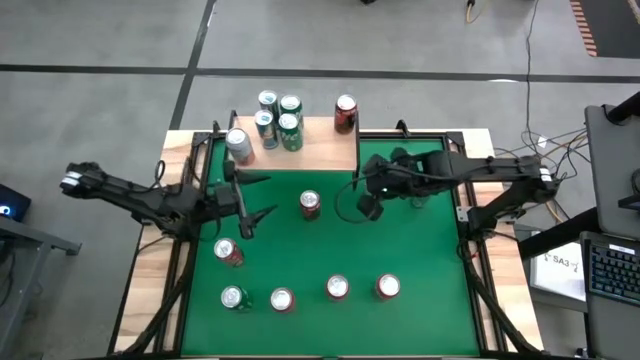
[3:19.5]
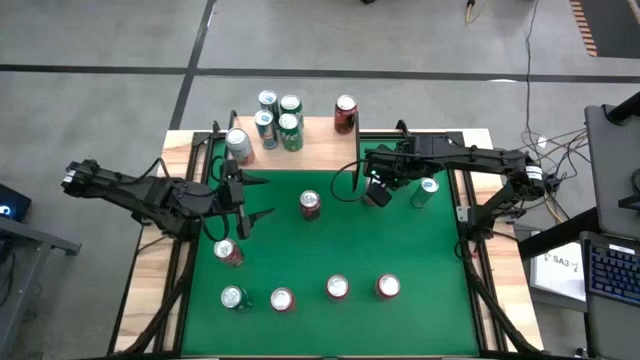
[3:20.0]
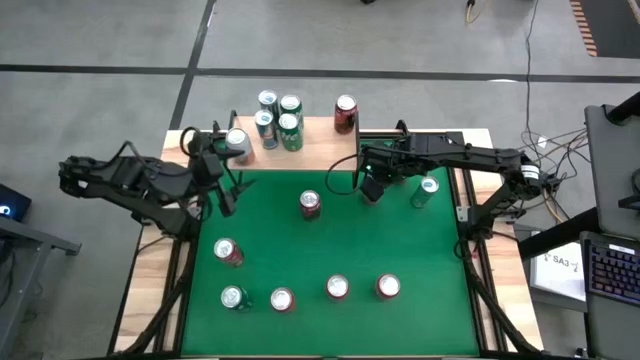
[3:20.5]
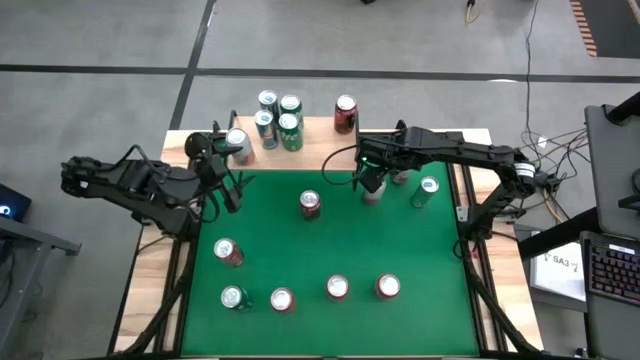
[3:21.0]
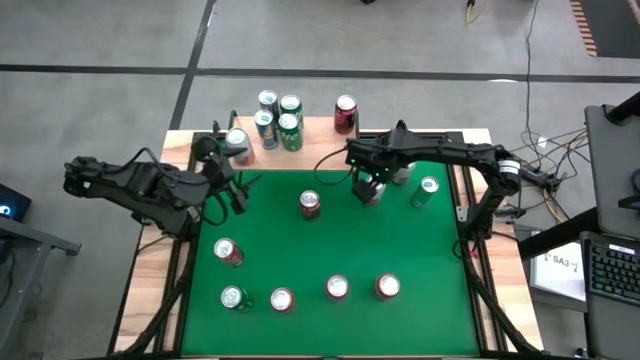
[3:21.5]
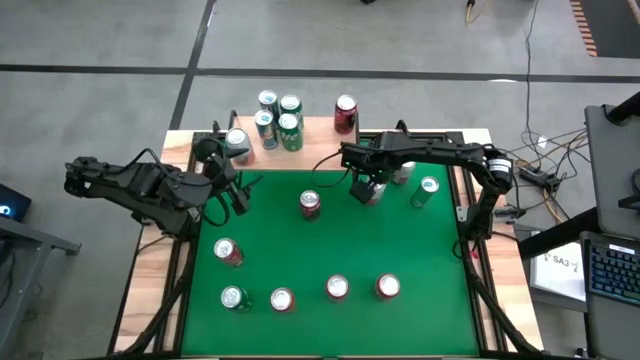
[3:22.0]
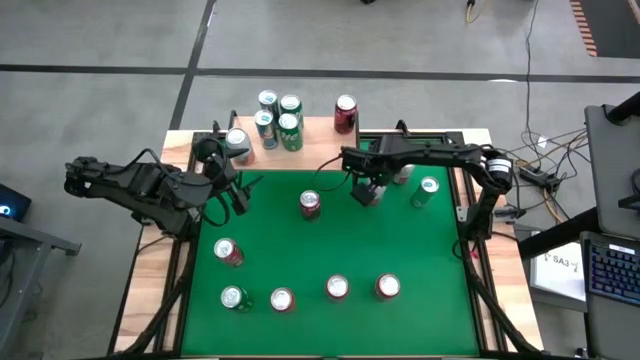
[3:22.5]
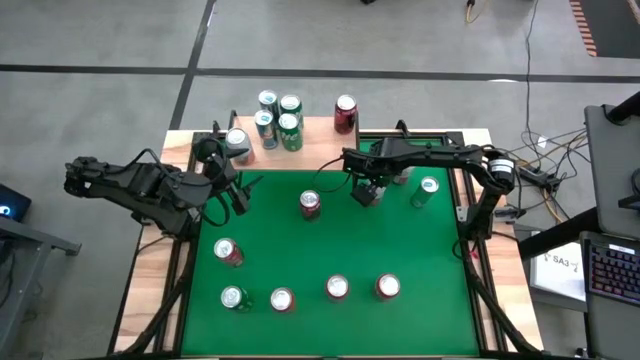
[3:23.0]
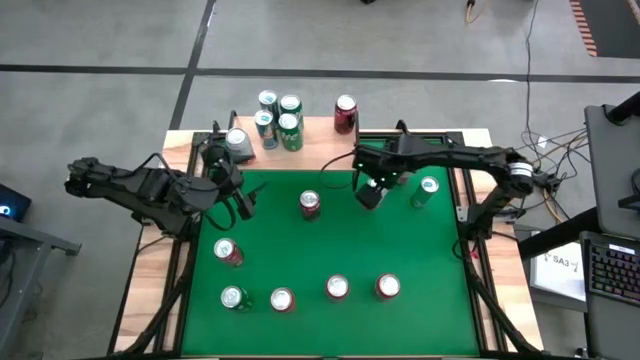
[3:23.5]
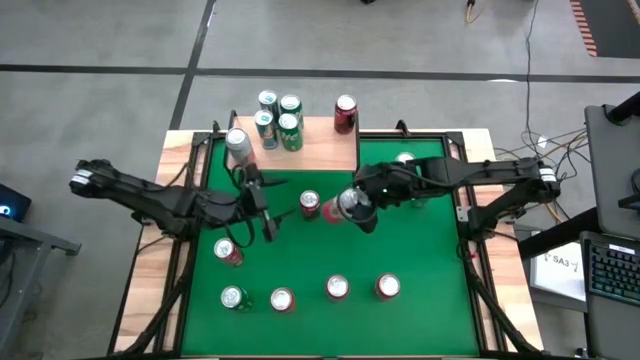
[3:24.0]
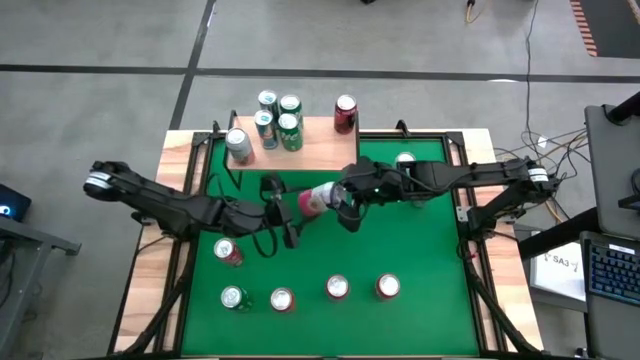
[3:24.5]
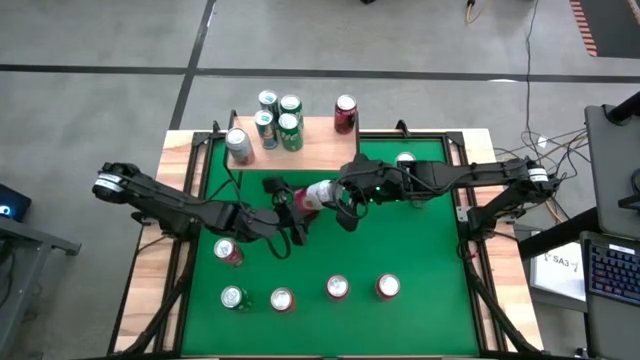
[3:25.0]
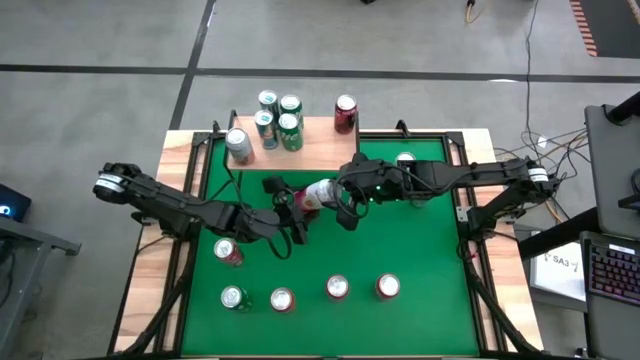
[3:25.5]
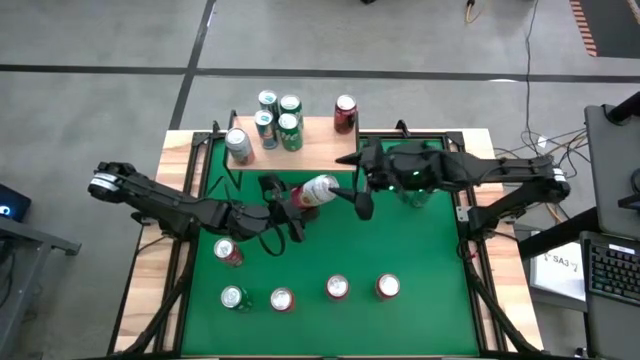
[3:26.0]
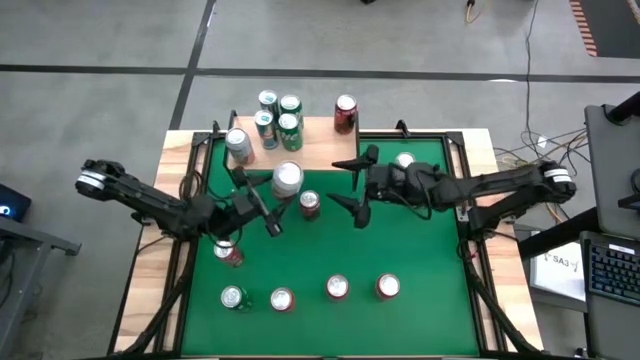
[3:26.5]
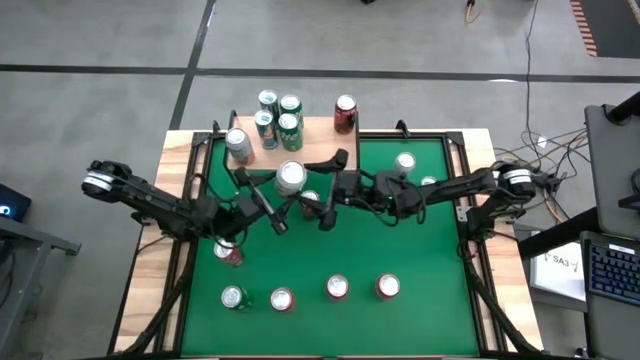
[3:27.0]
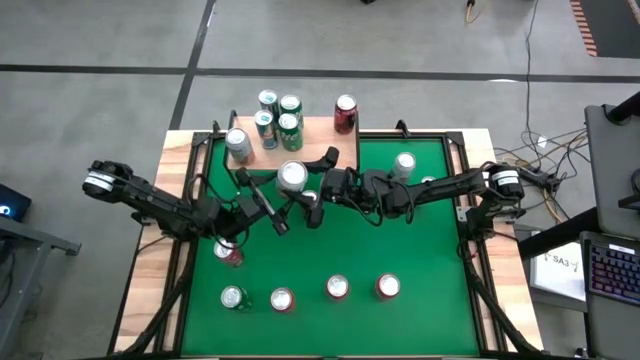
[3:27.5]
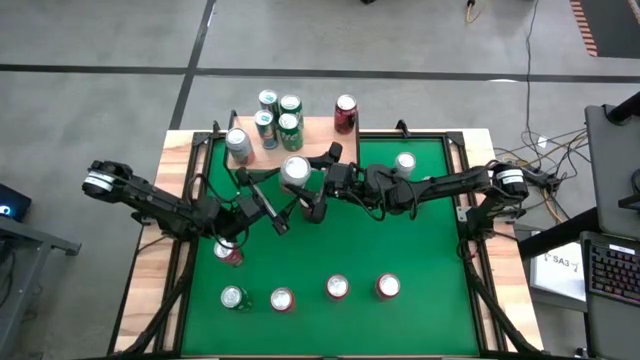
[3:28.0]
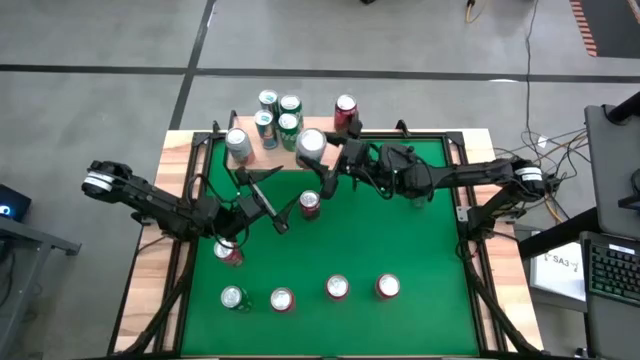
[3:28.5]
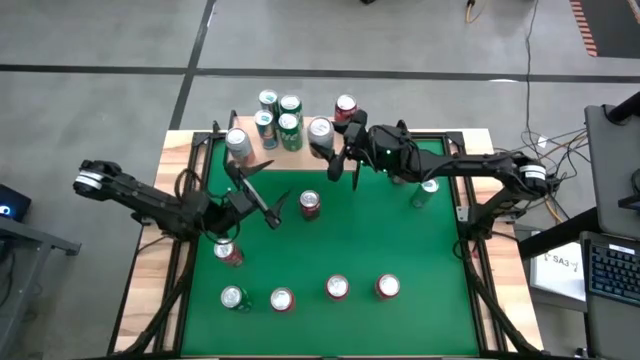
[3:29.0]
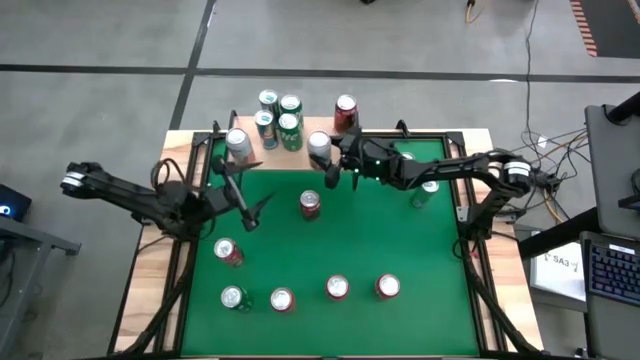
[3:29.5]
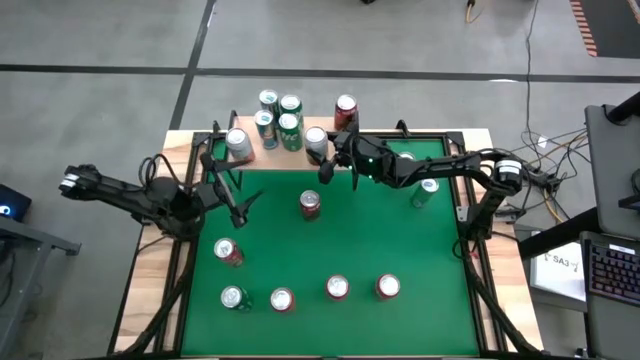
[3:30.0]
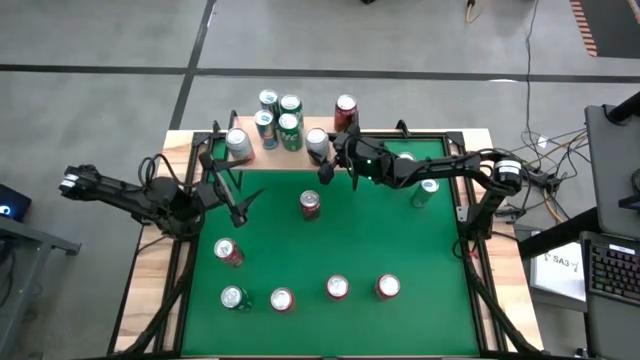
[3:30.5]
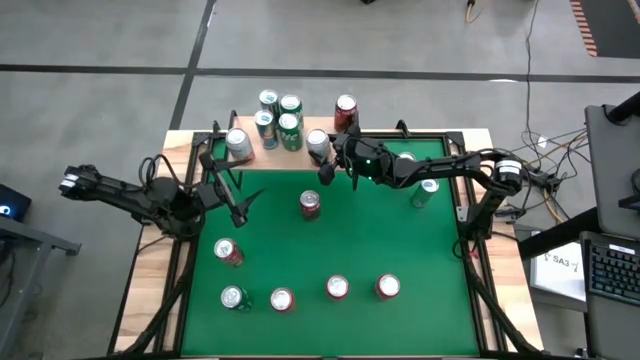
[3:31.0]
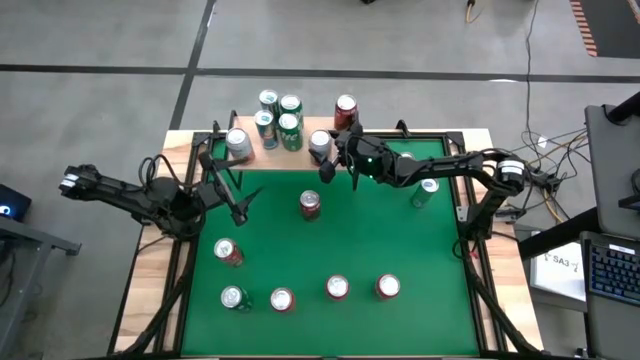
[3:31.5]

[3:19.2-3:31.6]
Task: Place canned beverage on shelf
Put the white and red can on the shelf

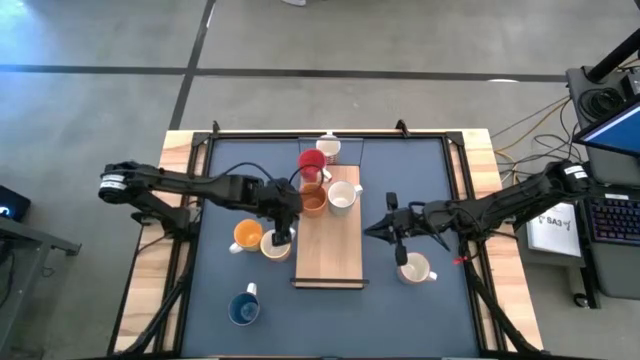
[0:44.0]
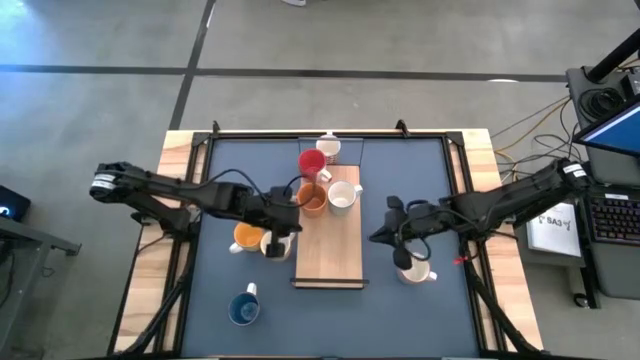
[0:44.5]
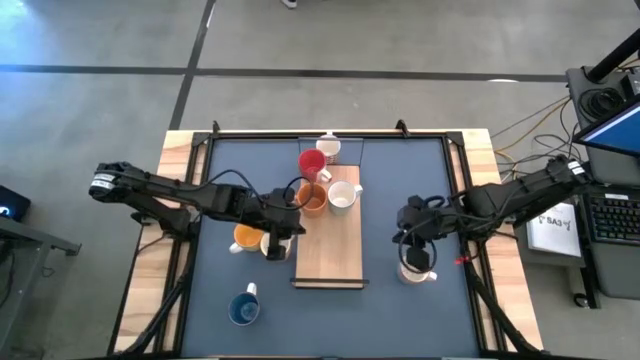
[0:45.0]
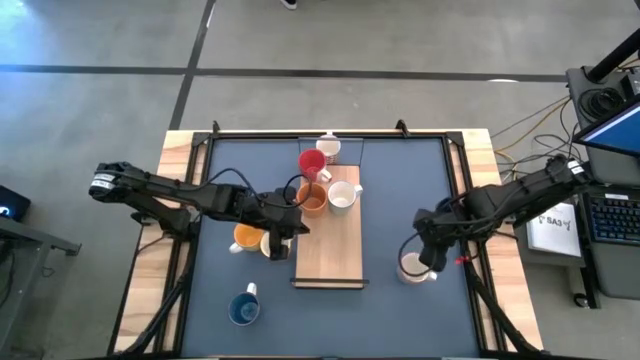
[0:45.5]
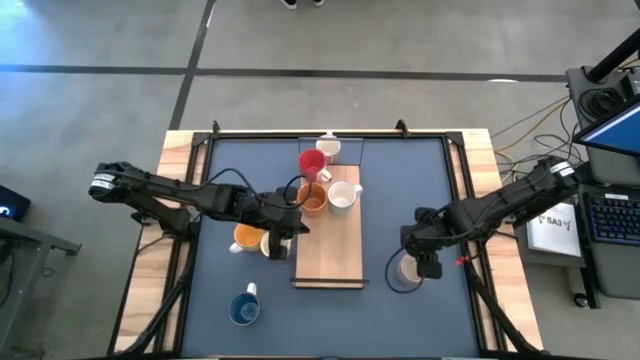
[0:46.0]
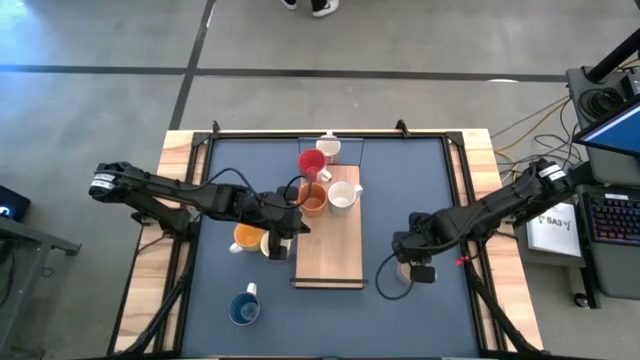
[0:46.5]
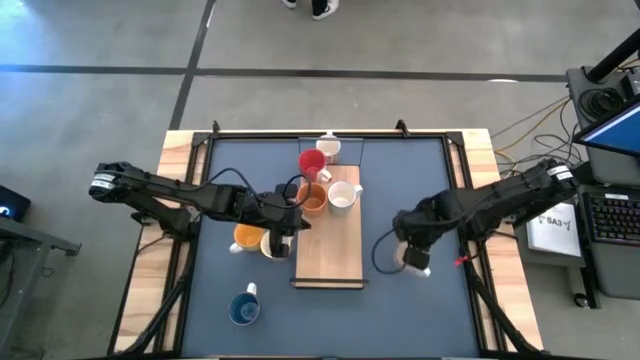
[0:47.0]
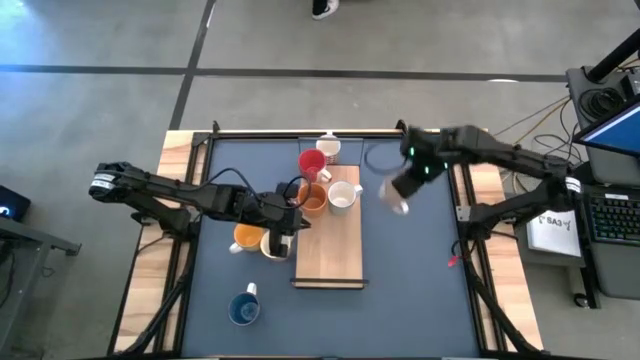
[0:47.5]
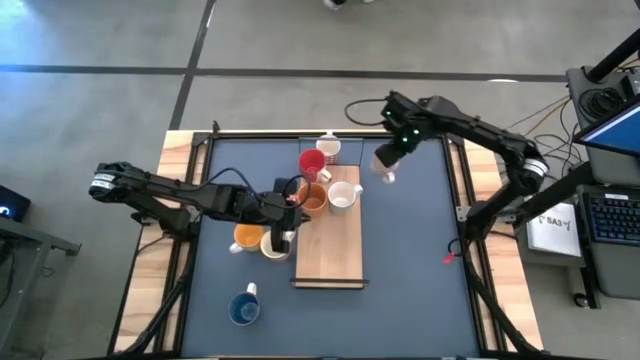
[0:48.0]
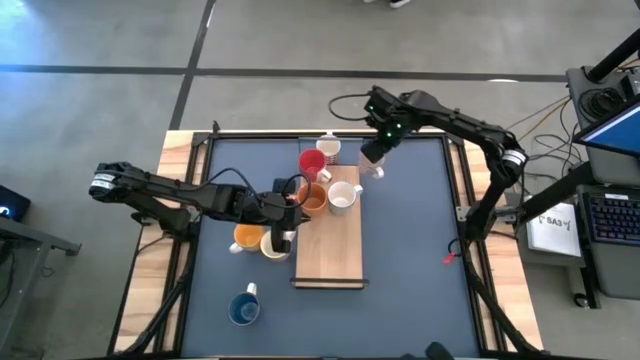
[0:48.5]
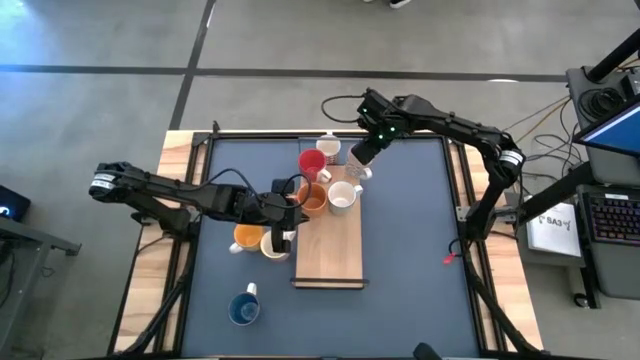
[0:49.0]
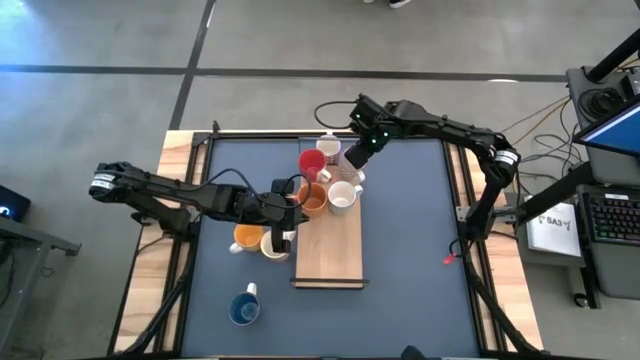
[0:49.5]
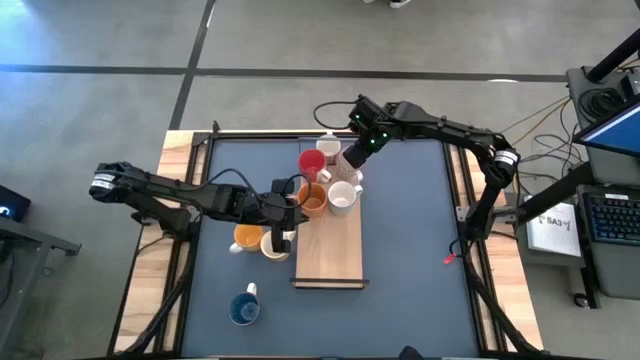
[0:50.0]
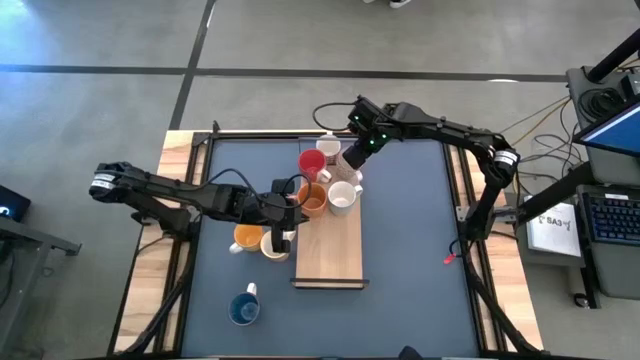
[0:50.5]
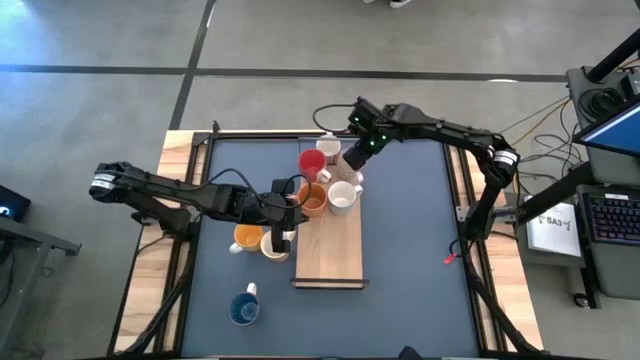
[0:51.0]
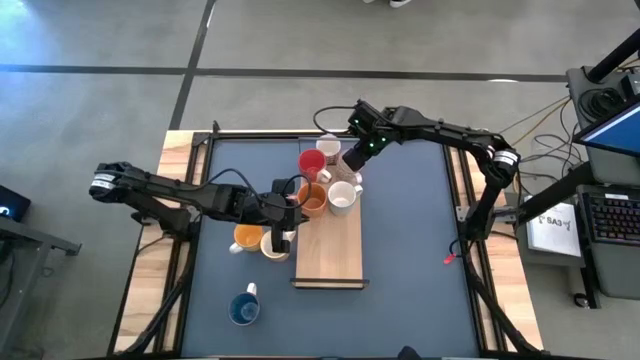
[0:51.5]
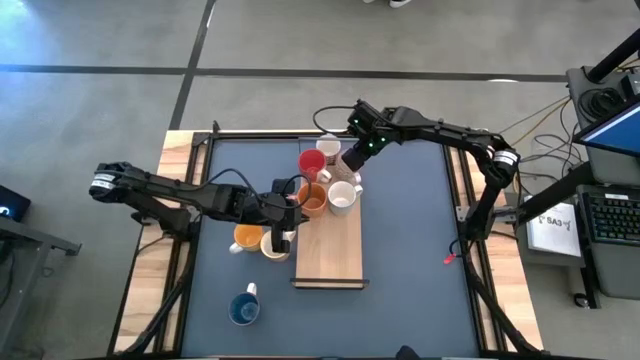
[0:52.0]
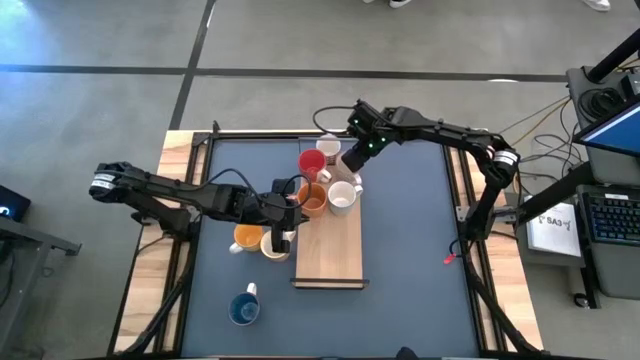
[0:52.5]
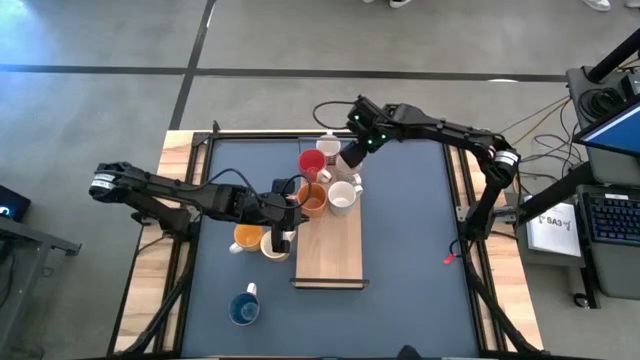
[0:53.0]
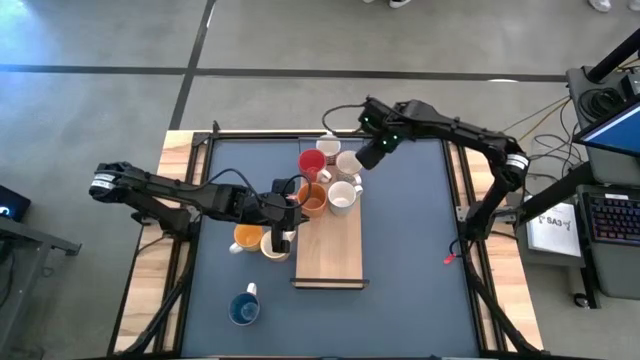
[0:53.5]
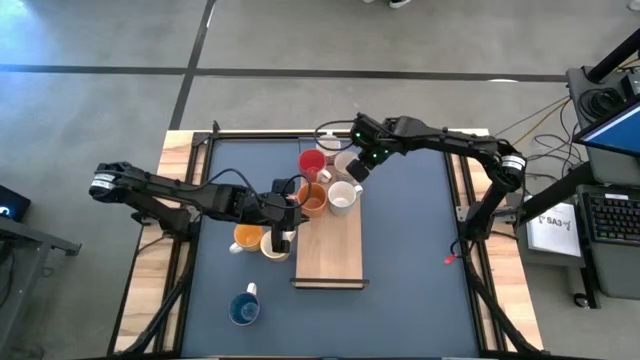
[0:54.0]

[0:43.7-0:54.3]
Task: Place coffee mugs
Put the gray patterned mug on the shelf
